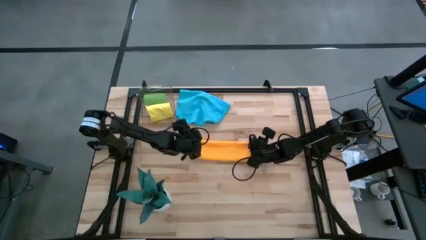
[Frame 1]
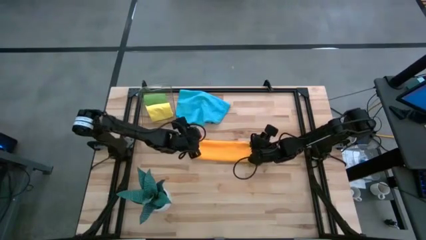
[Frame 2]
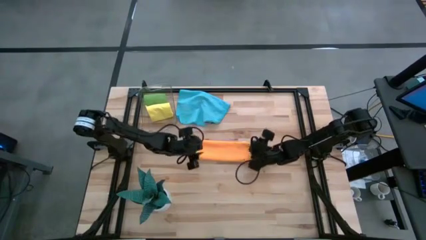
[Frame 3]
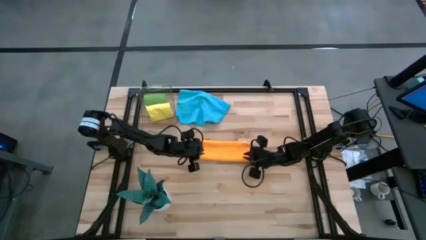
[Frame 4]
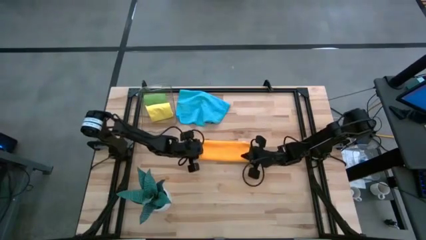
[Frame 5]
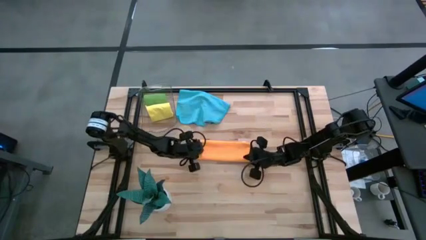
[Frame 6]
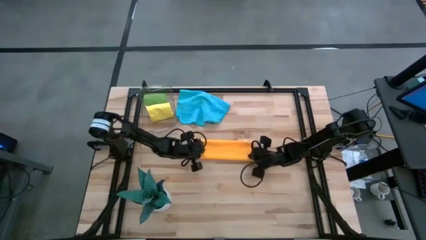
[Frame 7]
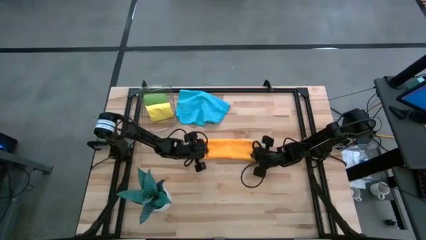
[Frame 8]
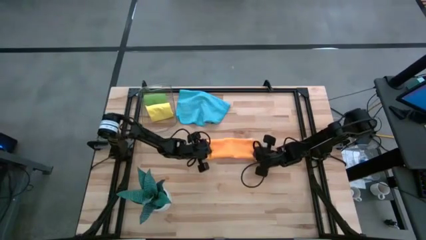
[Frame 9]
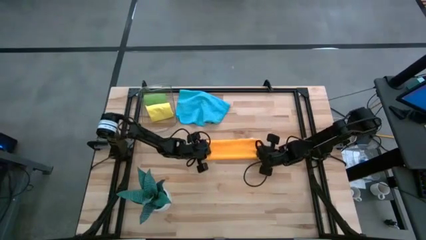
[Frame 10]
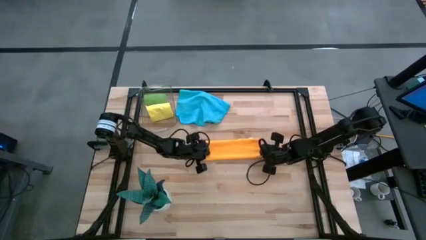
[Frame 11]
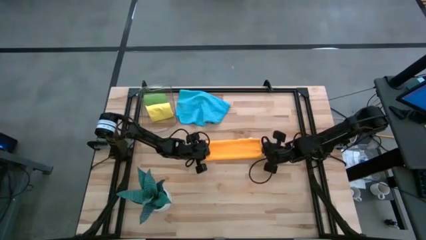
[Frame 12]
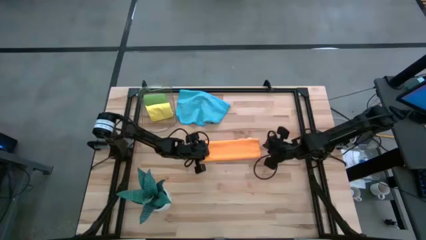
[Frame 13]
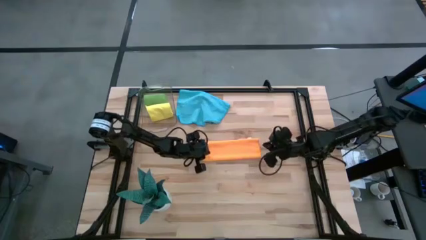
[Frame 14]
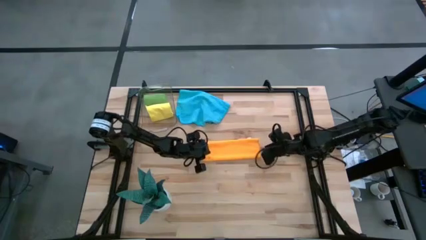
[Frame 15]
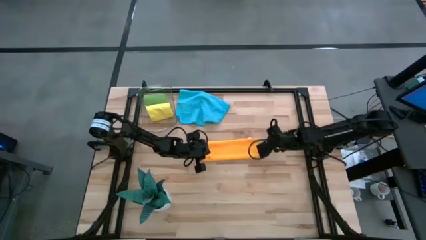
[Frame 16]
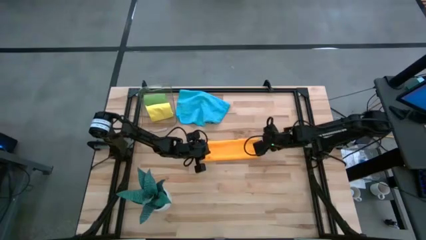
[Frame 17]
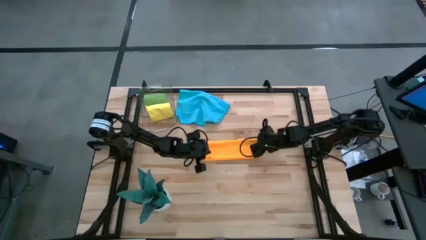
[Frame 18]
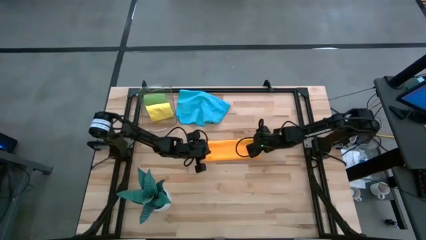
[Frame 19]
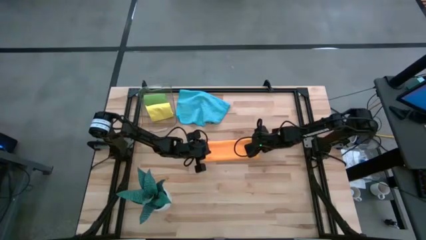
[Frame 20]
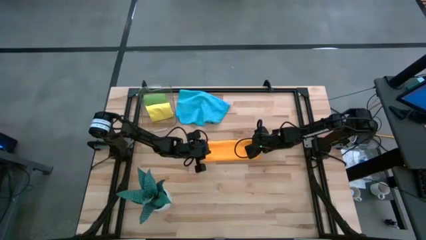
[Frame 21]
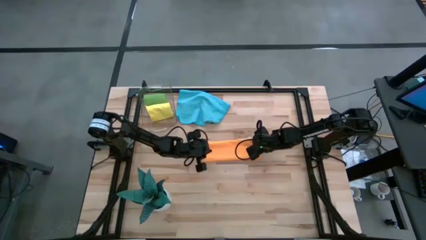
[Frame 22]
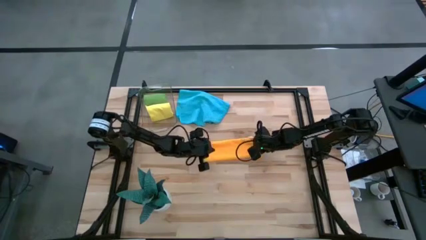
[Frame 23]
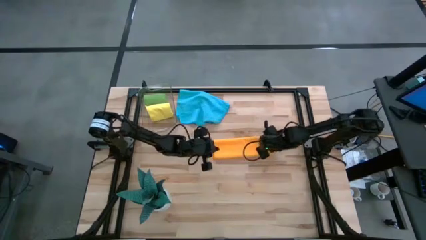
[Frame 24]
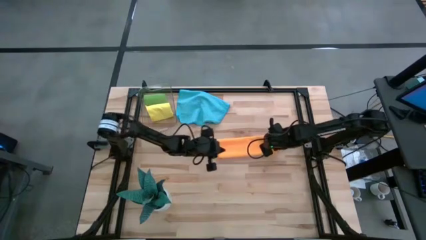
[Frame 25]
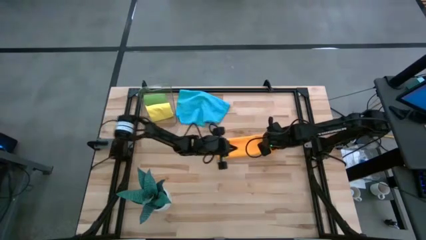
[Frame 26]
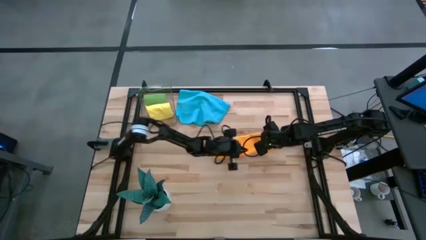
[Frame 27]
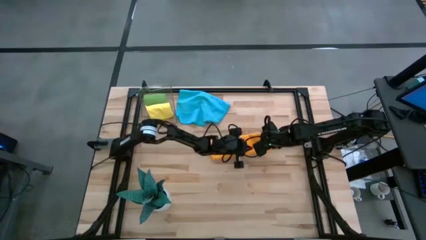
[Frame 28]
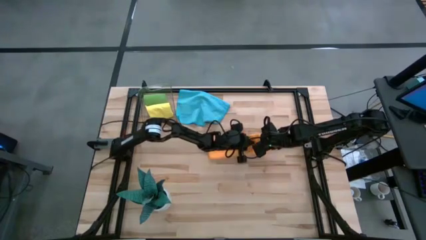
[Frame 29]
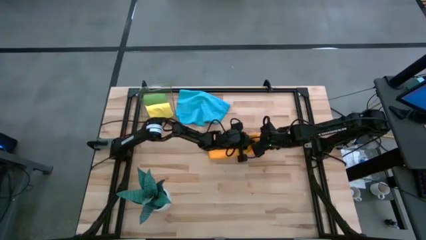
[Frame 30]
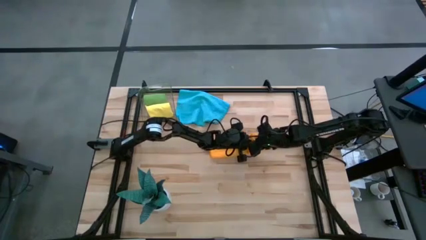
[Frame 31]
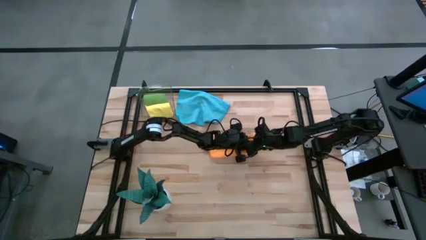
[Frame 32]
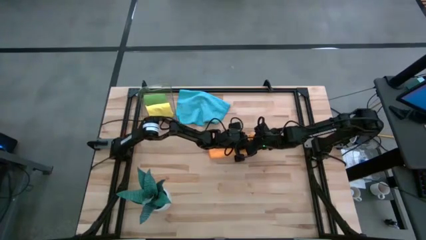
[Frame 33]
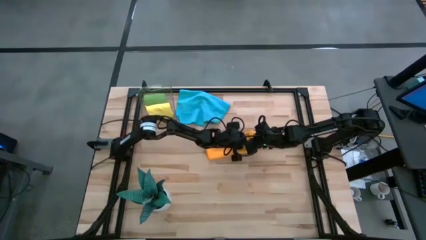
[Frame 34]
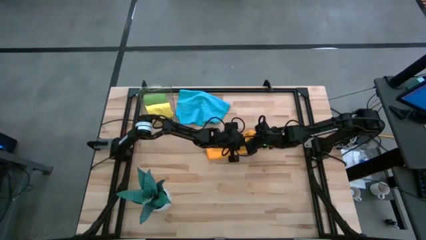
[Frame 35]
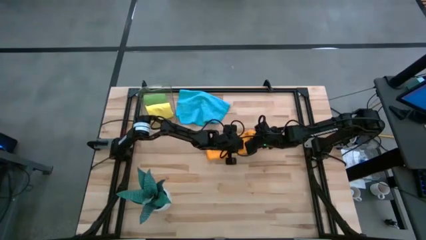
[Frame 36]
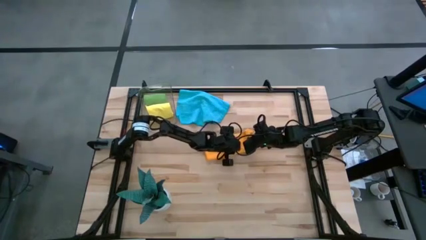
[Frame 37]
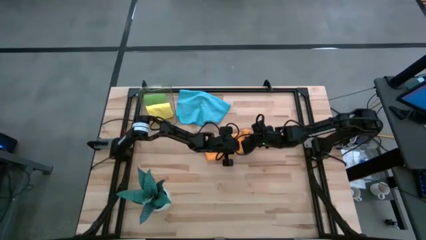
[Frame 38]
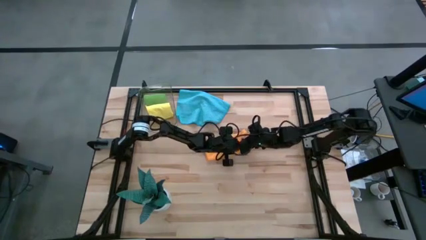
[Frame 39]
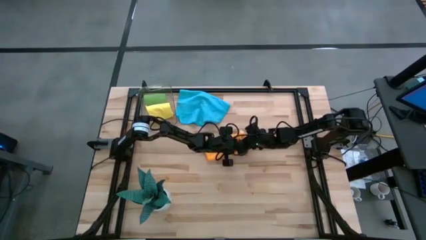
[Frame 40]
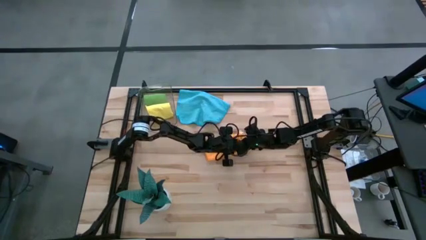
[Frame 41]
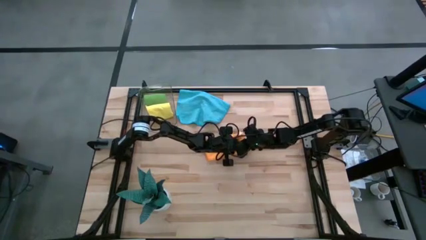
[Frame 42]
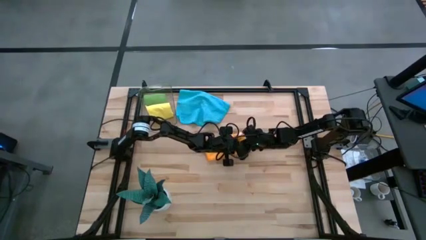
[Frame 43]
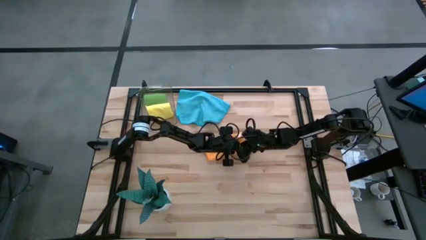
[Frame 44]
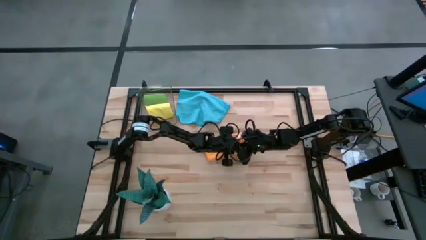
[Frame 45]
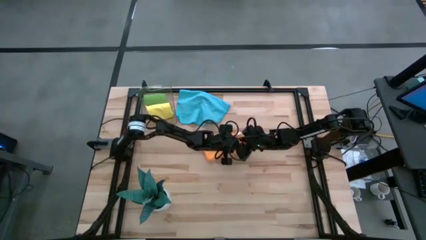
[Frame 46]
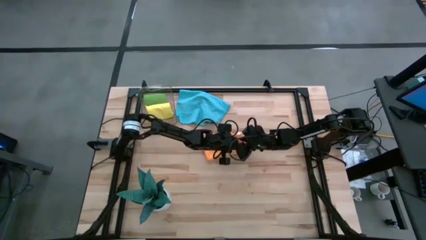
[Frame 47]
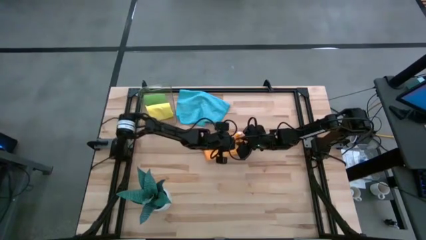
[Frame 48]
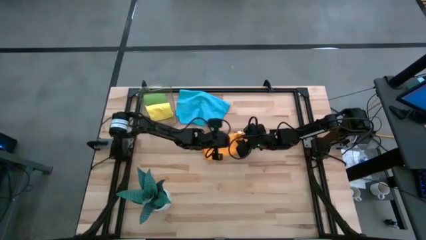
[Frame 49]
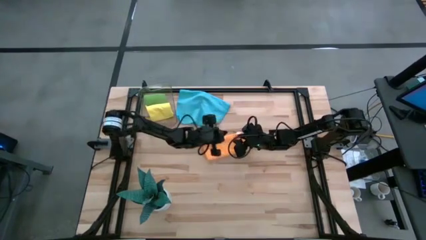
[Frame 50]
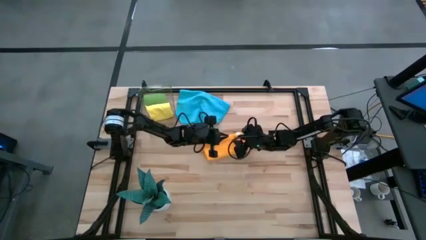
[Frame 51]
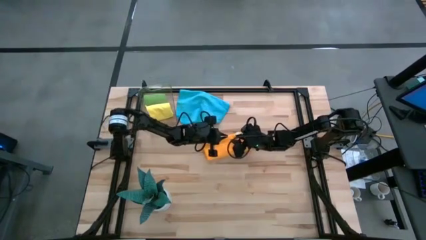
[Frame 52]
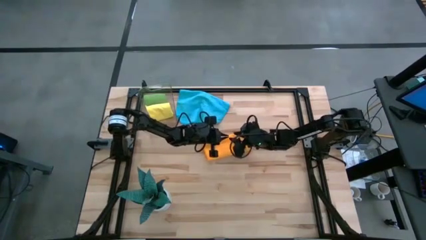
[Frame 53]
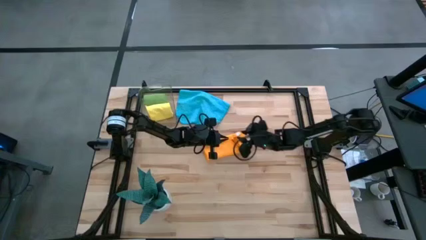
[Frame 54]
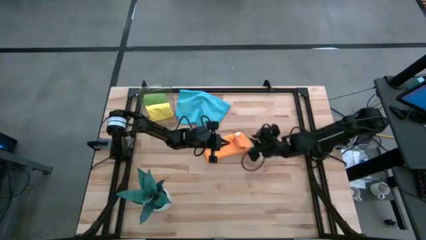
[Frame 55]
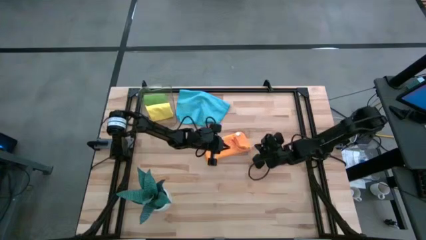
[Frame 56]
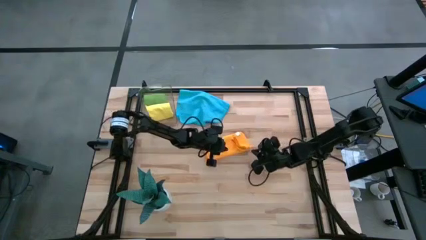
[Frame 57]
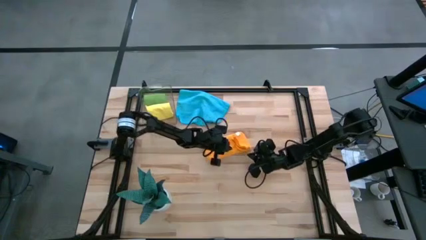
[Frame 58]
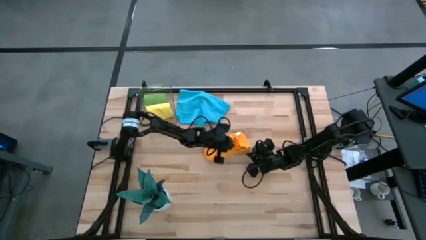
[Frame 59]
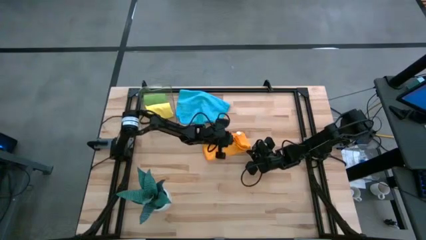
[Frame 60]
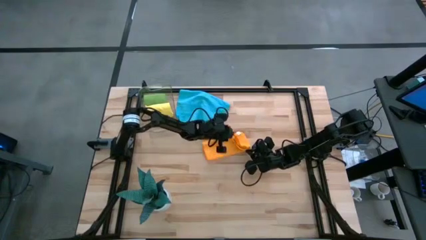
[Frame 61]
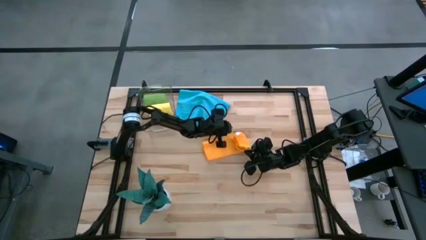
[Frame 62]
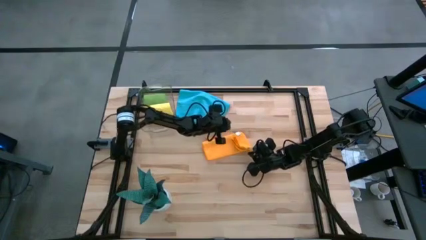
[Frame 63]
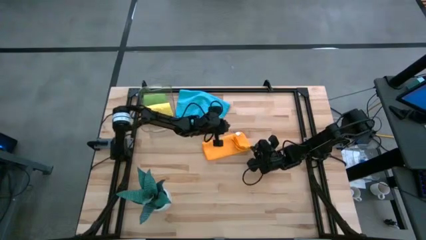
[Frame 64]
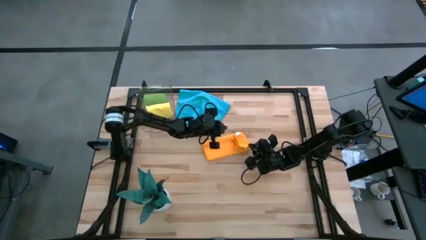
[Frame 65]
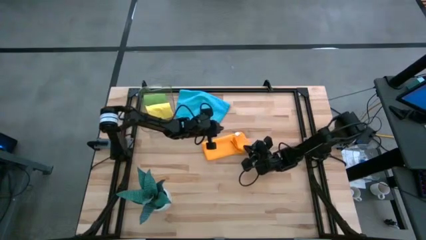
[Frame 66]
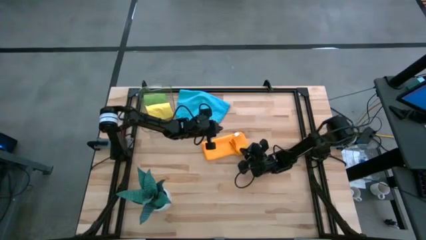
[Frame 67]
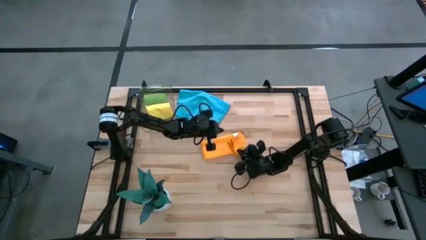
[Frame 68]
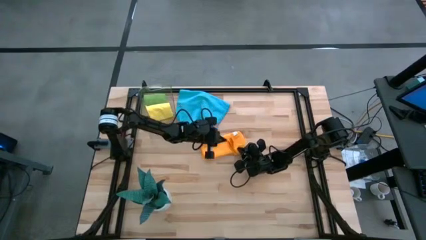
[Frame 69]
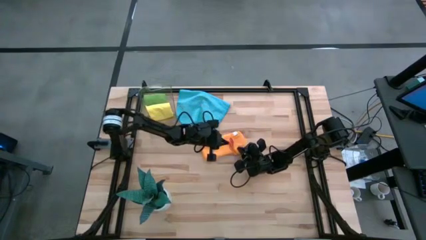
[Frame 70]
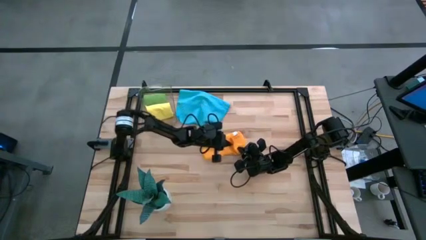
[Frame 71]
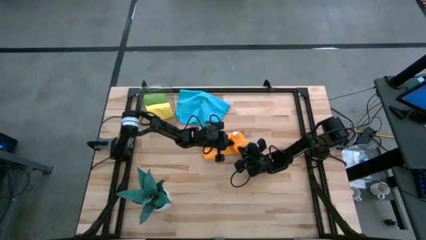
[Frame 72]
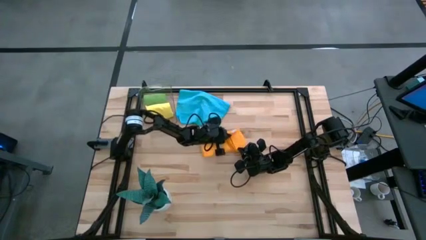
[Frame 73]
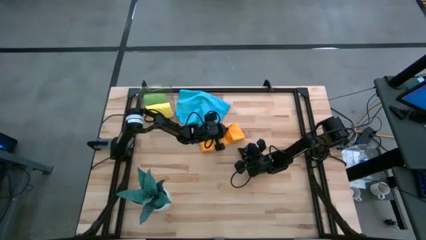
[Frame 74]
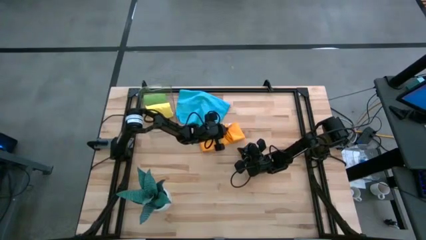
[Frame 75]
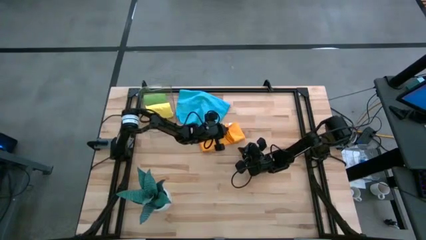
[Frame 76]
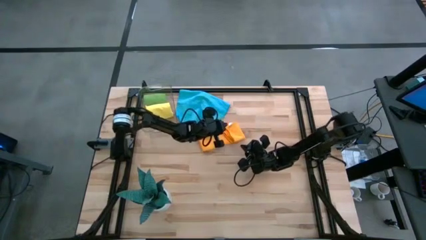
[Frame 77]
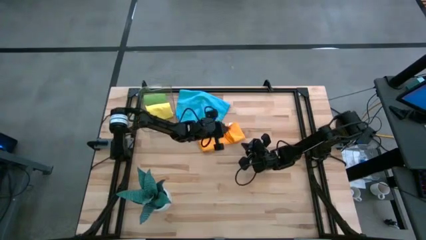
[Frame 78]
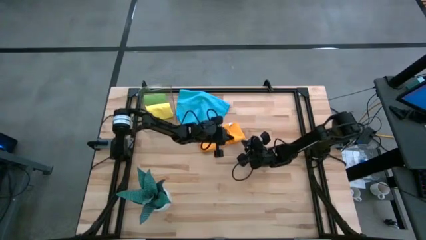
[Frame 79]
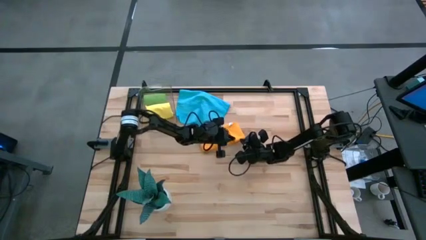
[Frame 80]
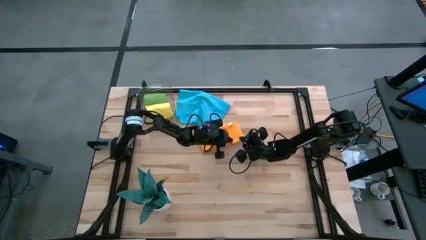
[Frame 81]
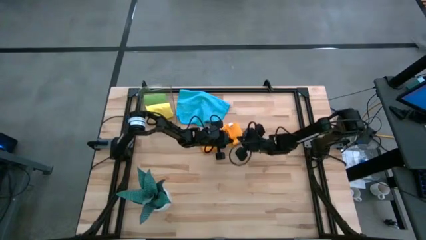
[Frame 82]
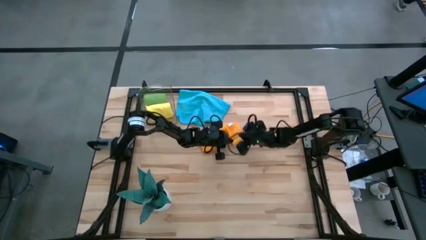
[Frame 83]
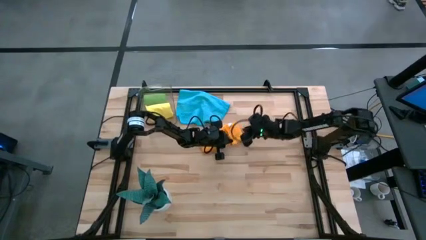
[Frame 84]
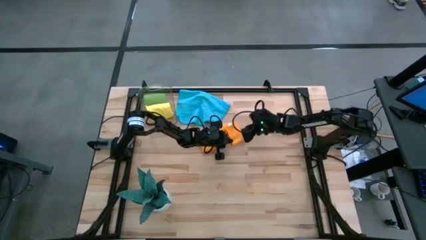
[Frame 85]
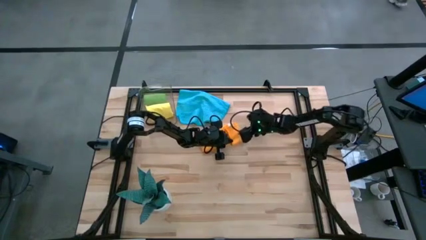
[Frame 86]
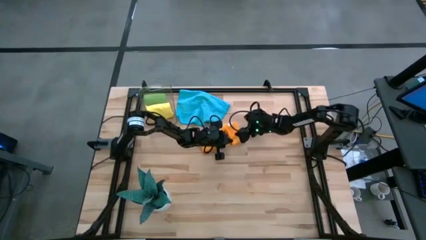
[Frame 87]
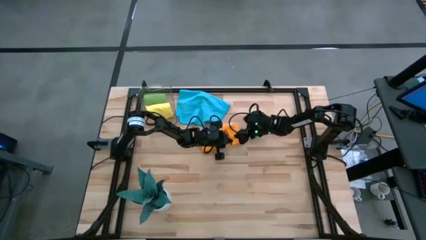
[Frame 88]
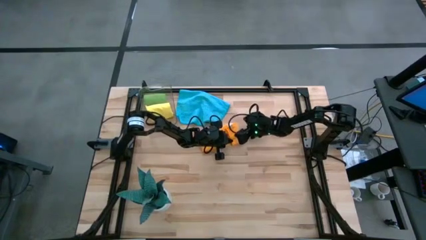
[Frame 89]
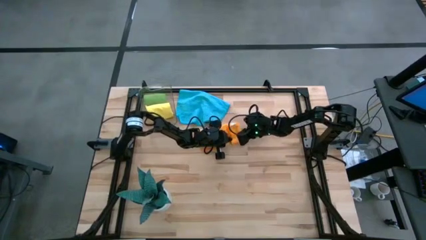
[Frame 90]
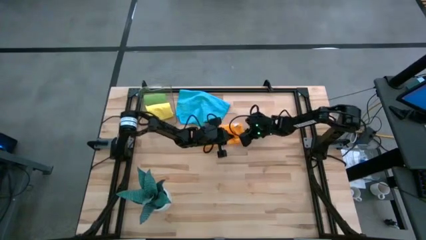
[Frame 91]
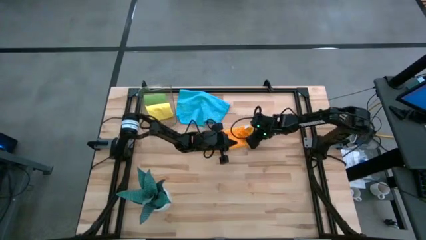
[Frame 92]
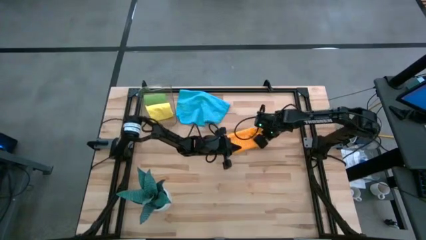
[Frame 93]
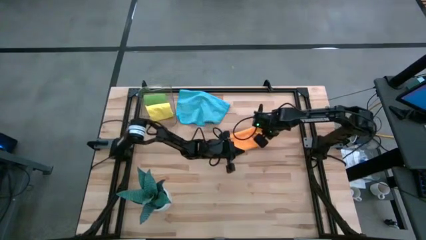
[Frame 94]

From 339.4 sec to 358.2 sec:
Task: Roll microfiber towels into tight, uniform cylinder then place into a basket
Roll the orange microfiber towel
